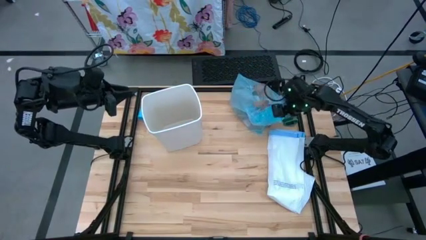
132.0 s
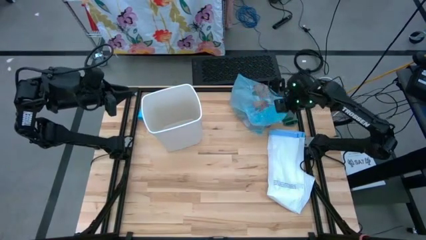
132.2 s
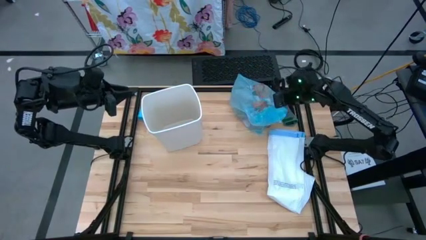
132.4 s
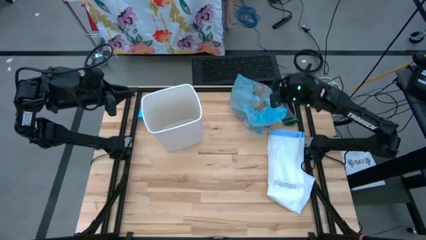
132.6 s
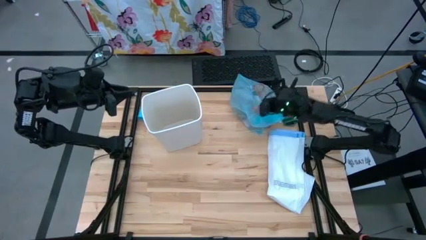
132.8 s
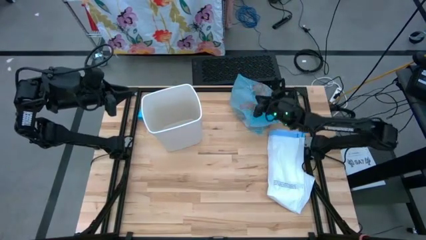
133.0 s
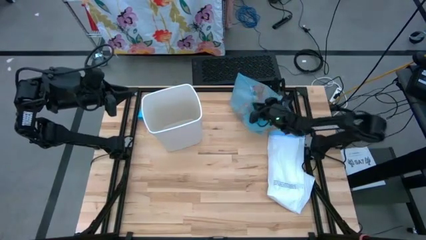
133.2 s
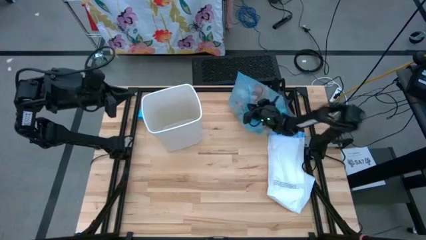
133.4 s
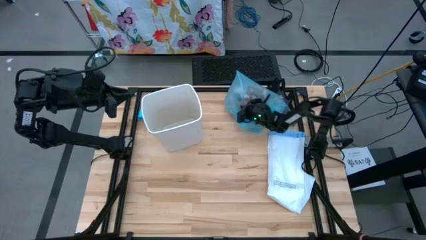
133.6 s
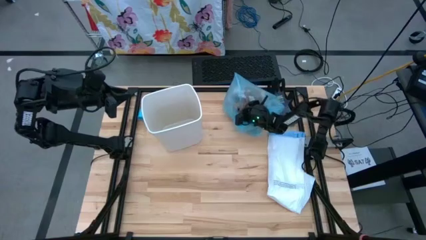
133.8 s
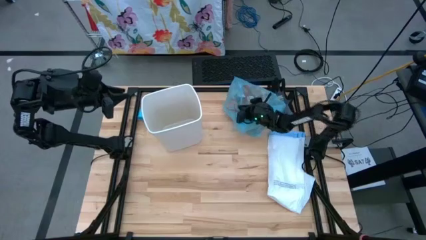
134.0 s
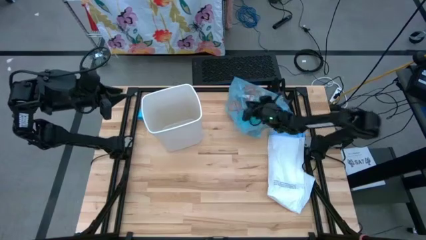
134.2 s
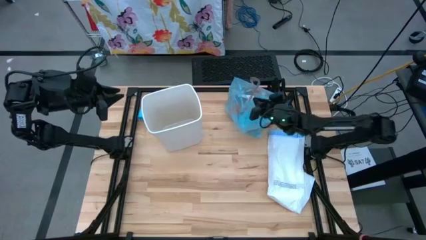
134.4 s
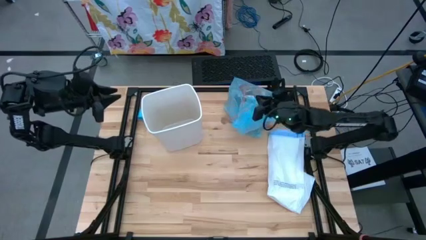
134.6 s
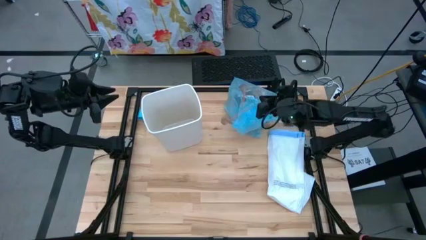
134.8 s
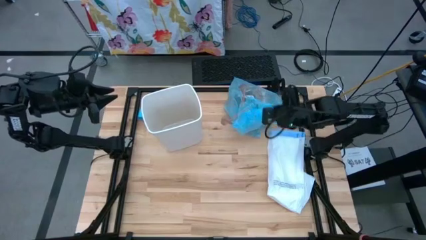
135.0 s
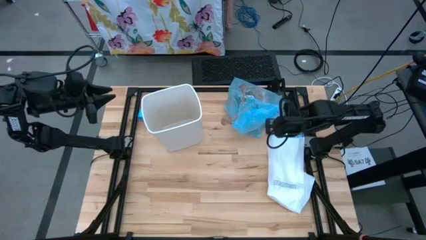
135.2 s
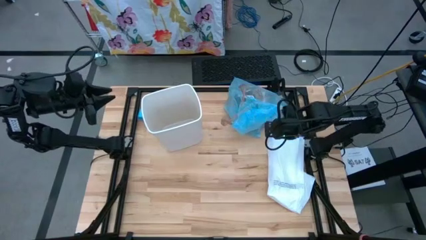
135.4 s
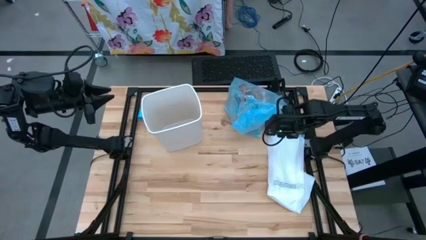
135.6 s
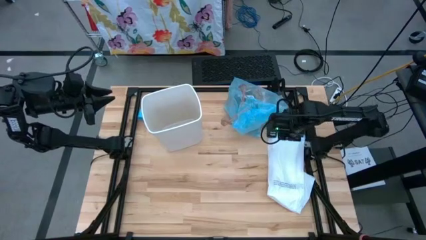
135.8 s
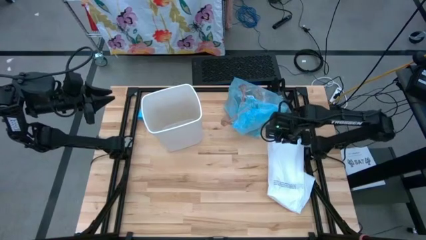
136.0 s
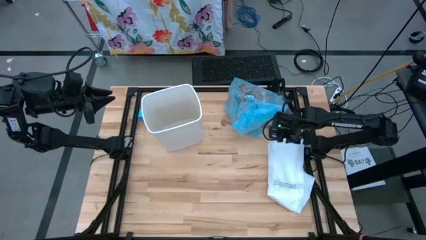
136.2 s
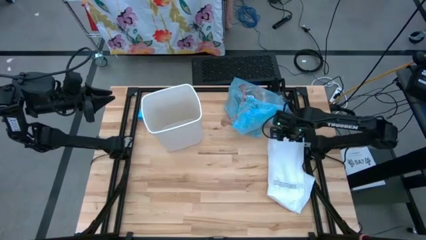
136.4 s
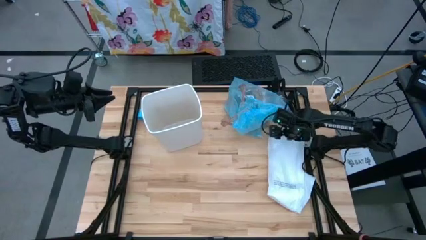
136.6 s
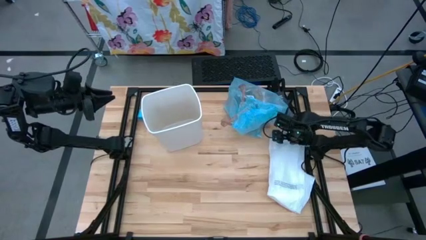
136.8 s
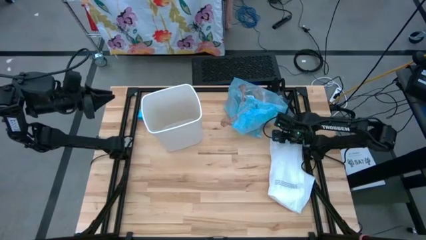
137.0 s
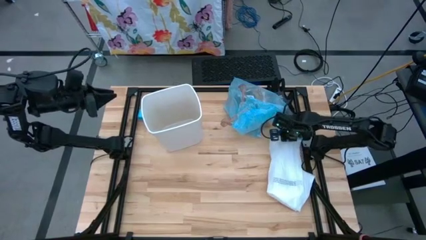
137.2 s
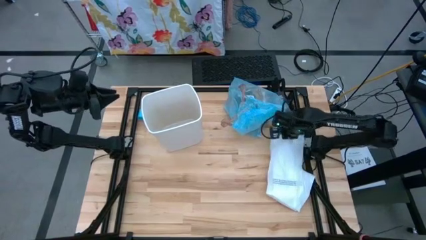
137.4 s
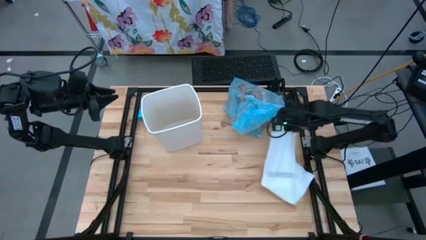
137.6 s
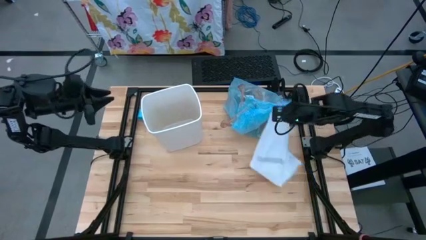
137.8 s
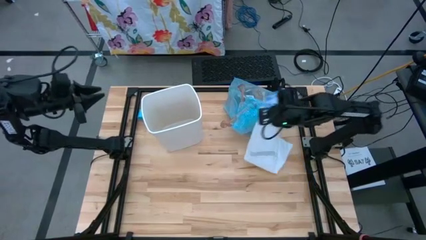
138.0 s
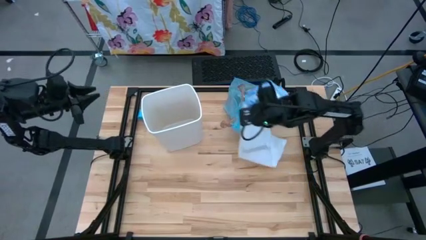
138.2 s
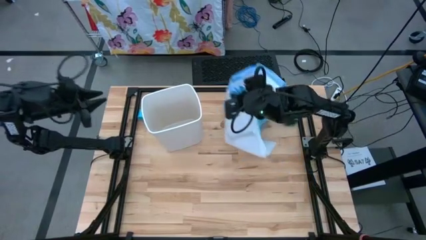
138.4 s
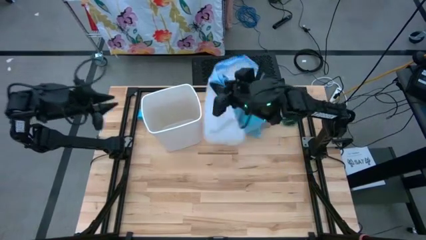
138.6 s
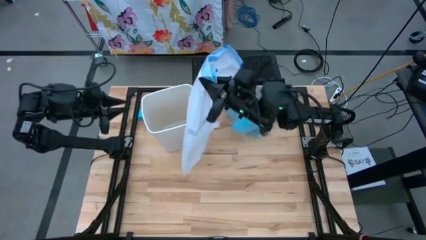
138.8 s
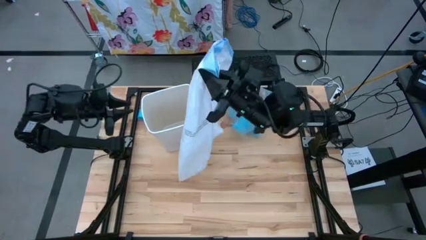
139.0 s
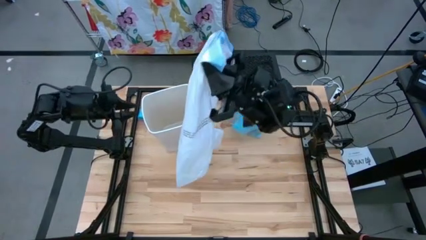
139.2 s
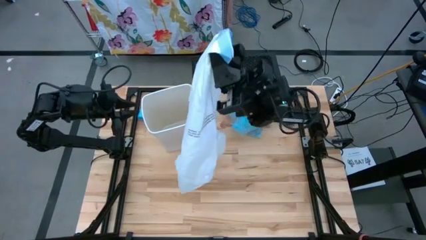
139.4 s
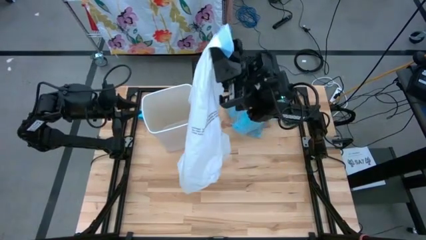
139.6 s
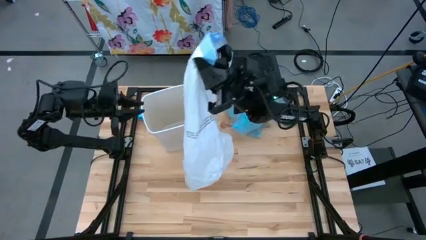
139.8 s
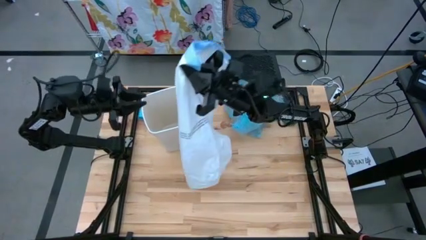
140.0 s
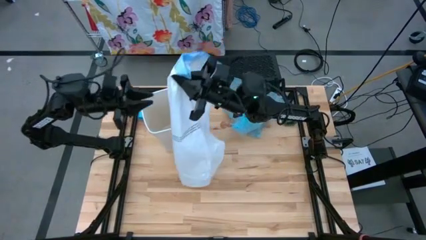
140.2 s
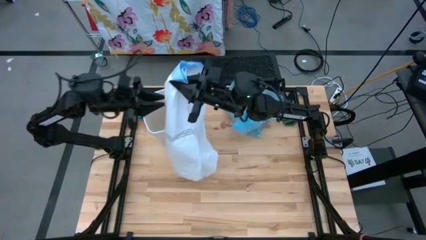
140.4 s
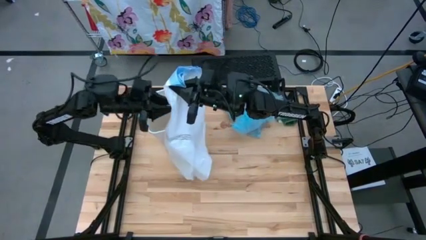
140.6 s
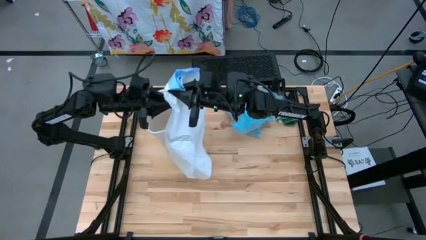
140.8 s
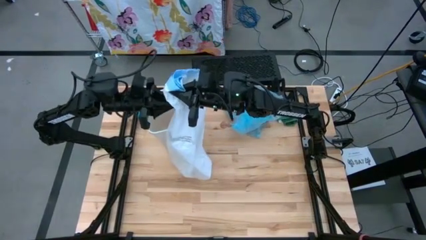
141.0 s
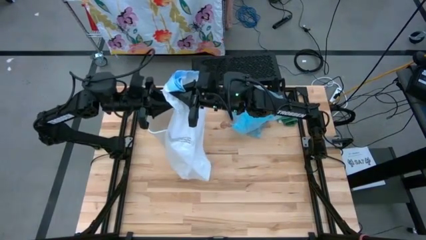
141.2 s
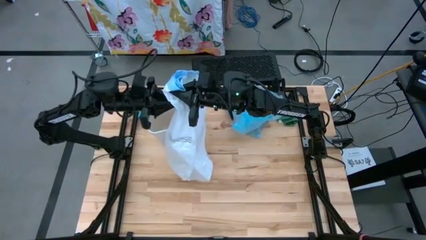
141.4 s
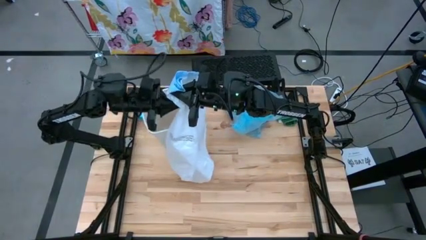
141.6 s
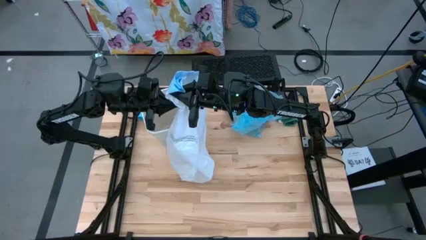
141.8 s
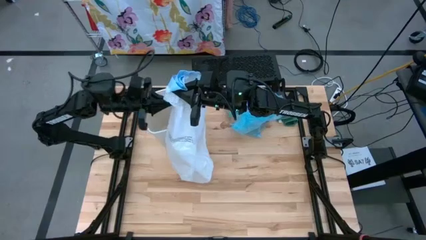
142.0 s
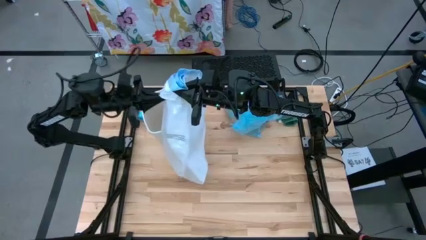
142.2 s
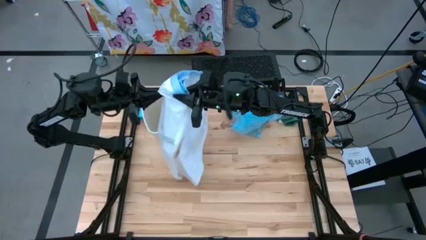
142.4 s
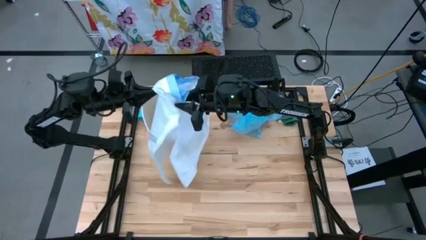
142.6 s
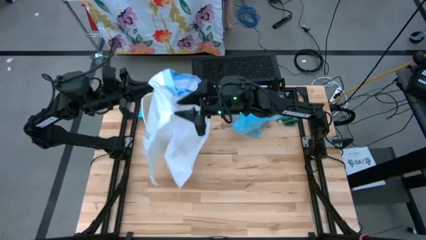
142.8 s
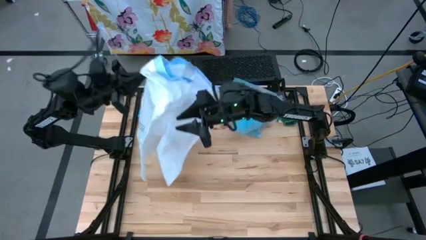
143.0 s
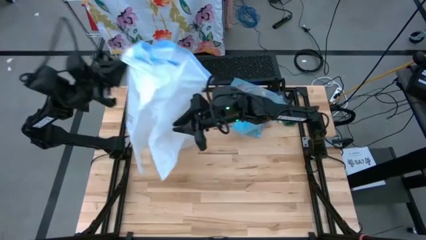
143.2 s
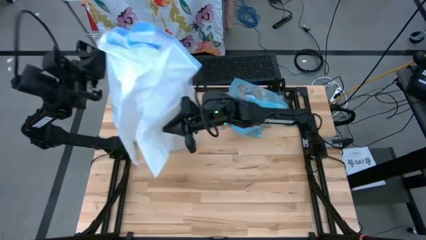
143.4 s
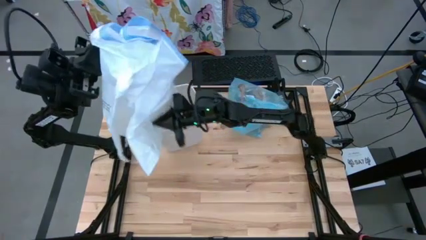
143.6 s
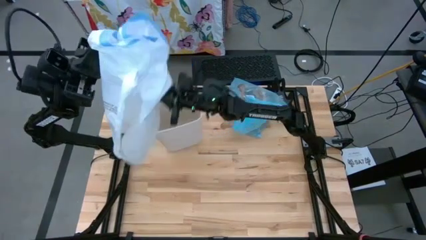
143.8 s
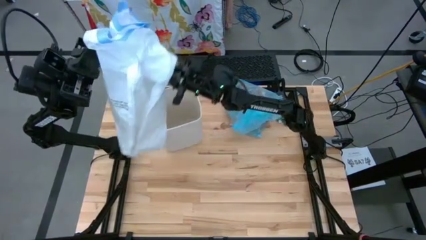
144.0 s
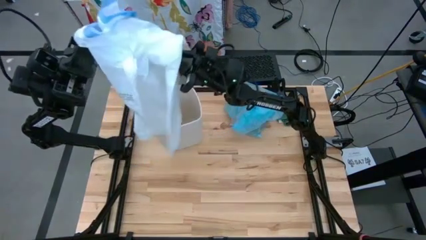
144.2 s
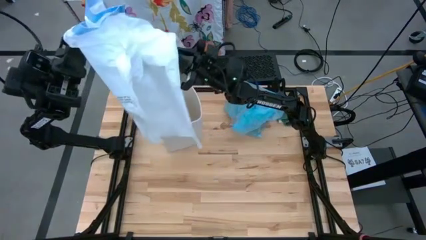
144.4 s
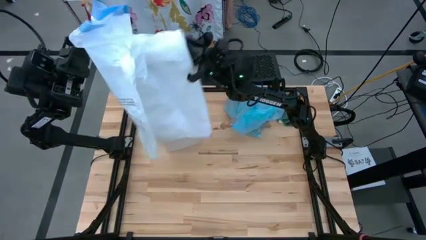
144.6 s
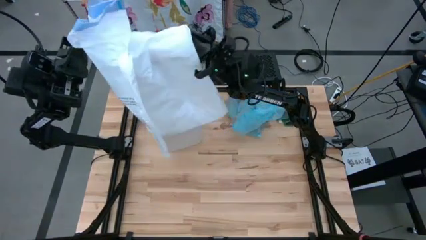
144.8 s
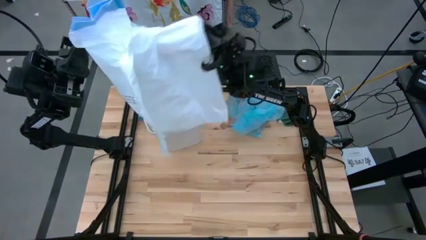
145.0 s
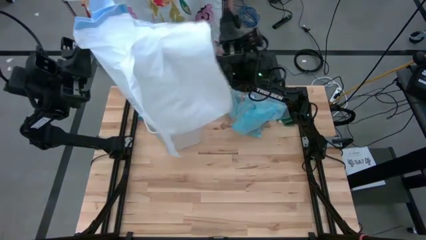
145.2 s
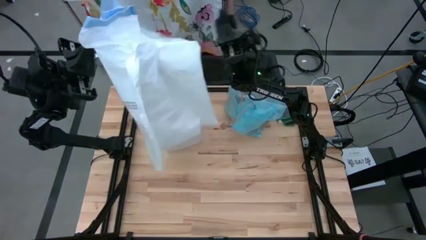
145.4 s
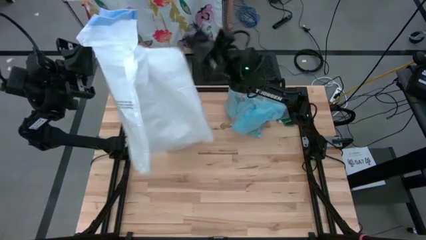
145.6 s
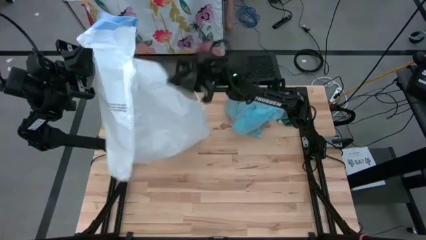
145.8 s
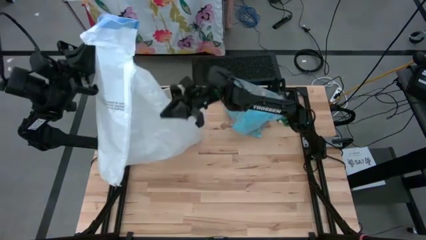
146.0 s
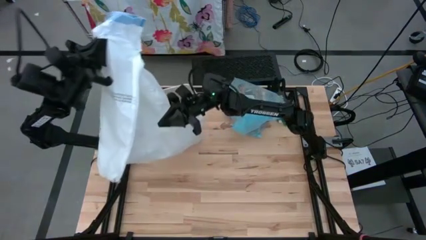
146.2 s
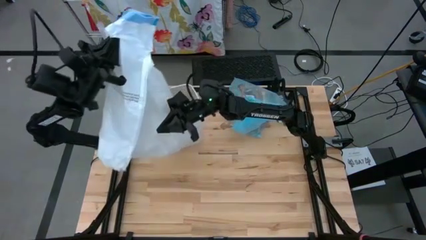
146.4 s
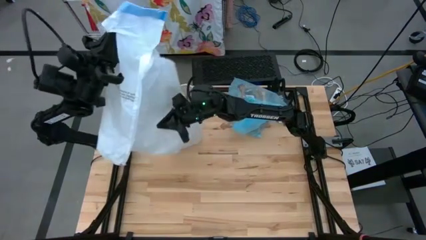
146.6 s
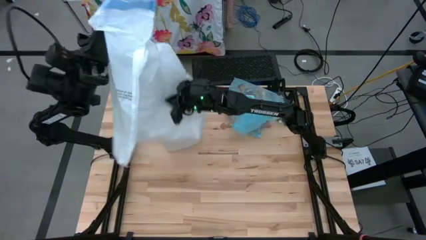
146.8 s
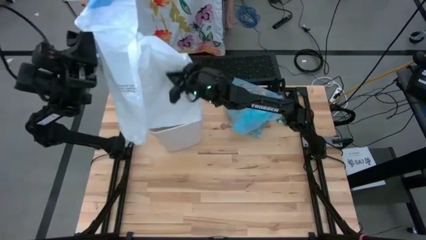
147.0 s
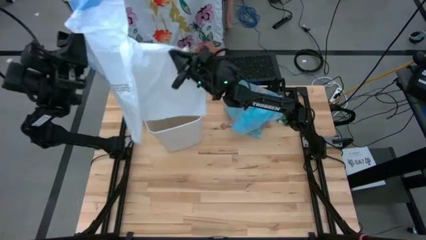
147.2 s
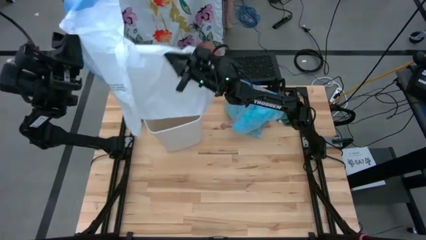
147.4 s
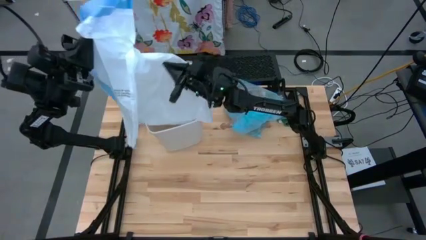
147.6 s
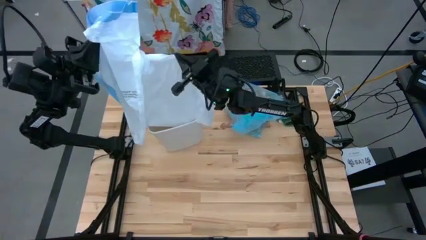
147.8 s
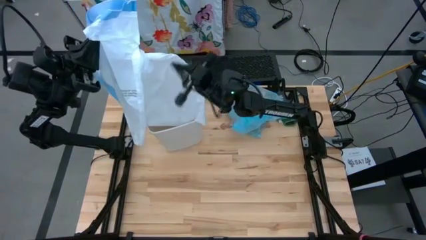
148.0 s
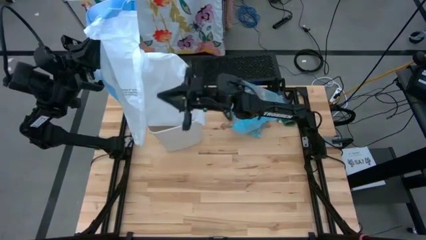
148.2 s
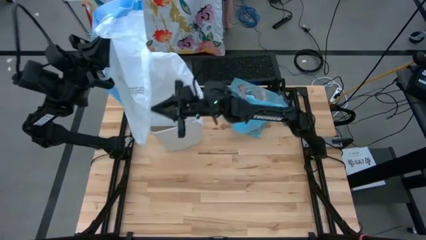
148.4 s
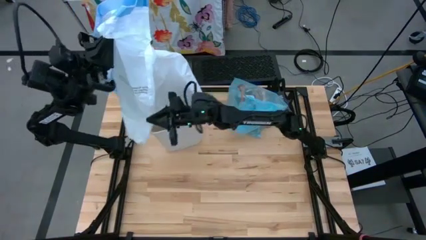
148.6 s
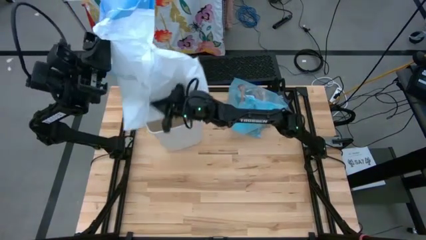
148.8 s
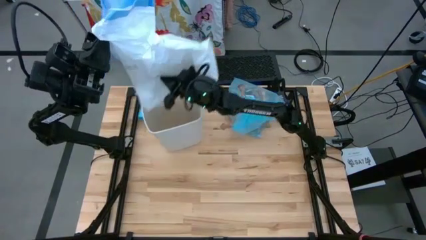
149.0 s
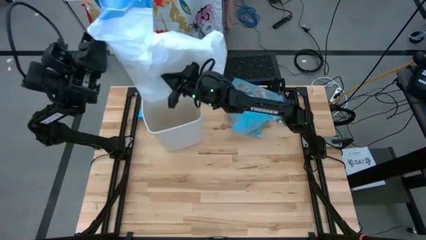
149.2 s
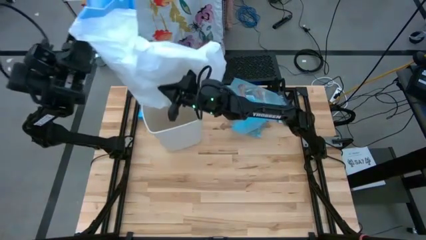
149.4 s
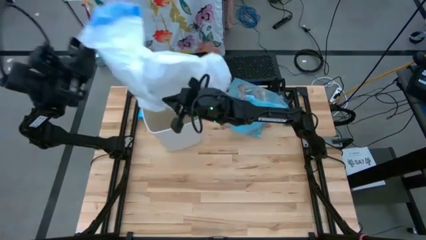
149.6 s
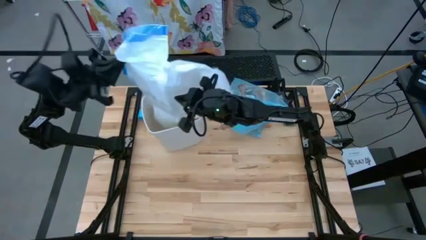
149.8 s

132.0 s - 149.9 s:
Task: place trash/remove bag and relplace
Put the white trash bag into the white trash bin
